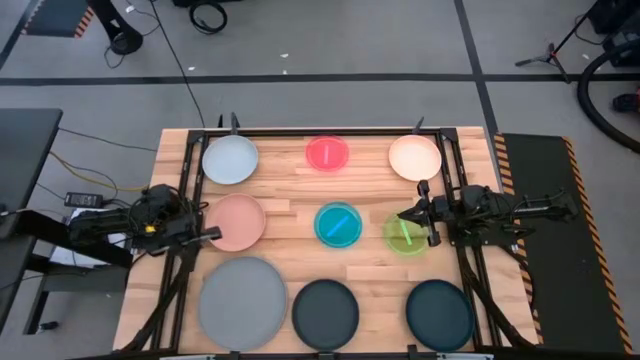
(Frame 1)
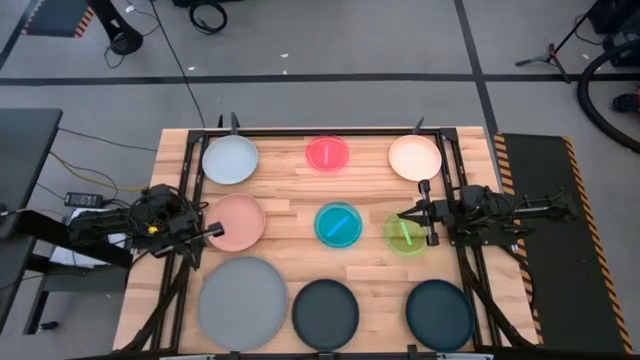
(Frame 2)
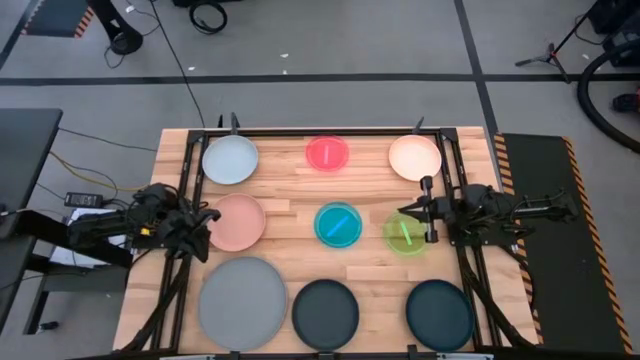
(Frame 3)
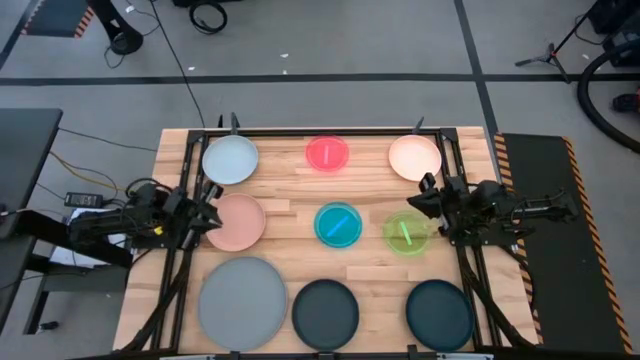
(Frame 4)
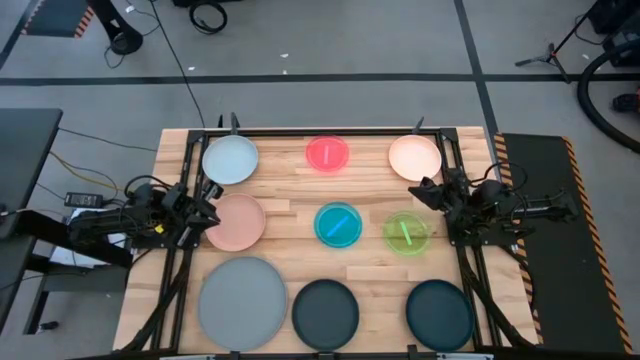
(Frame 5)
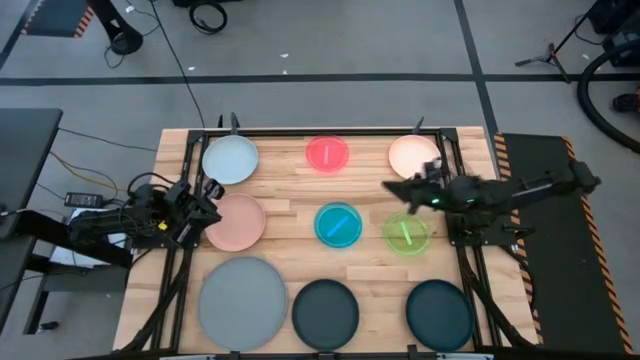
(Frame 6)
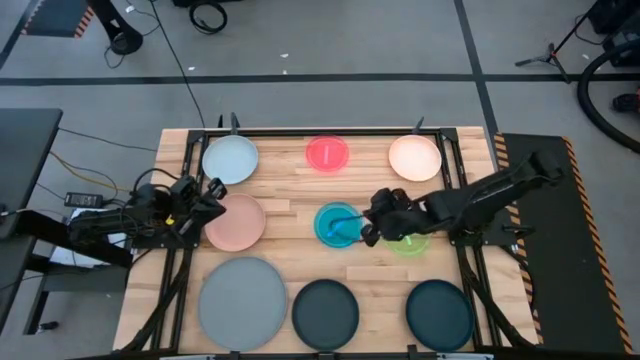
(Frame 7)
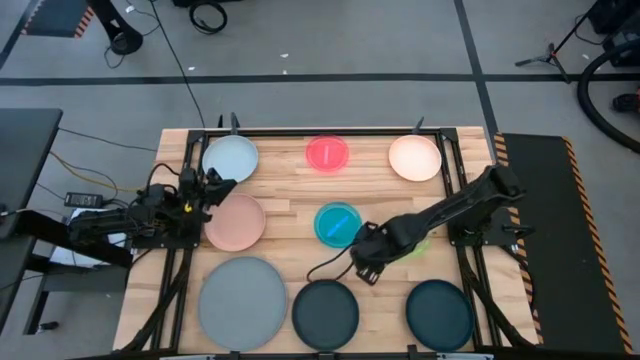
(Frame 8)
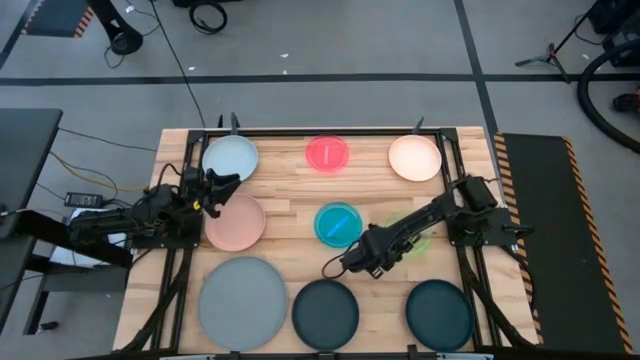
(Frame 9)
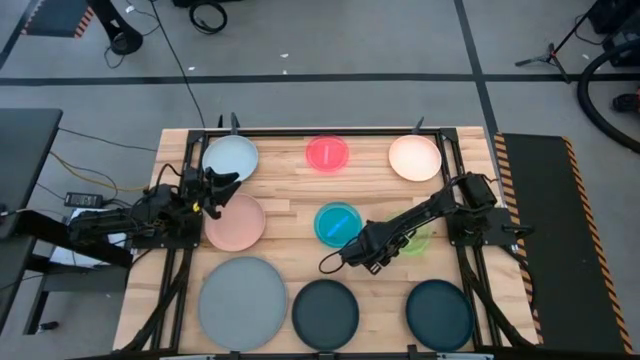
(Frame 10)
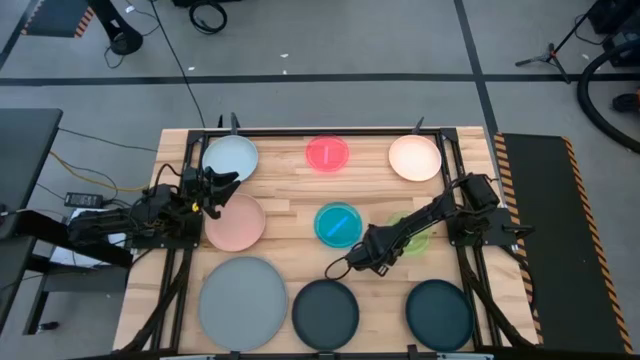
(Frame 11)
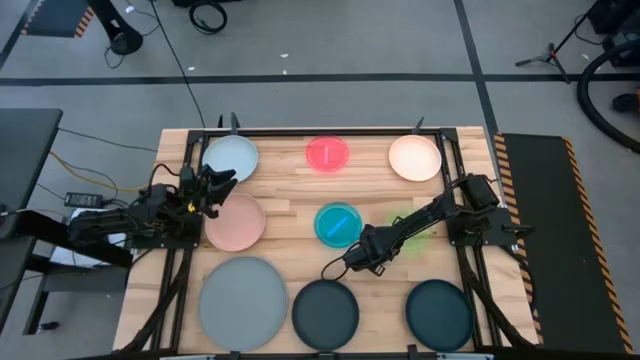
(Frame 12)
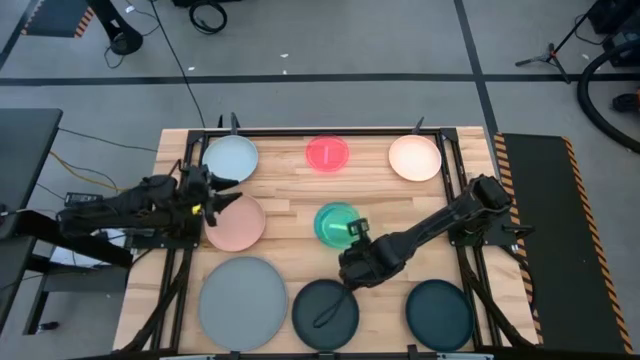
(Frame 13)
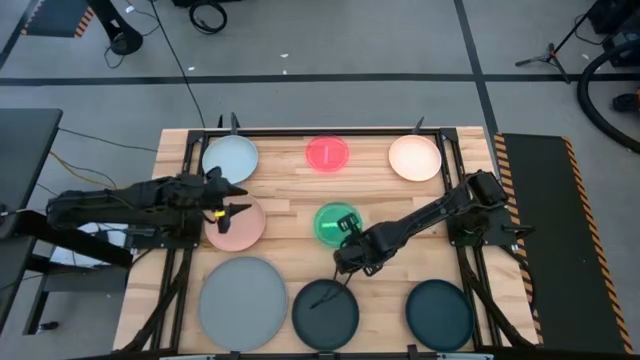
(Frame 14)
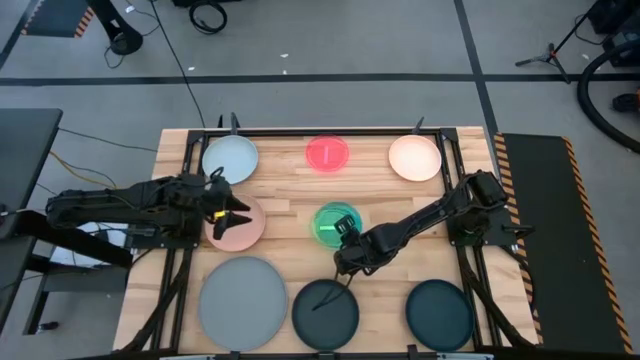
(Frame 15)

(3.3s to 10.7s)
Task: Stack plastic plates
Stack the green plate on top of the blue plate

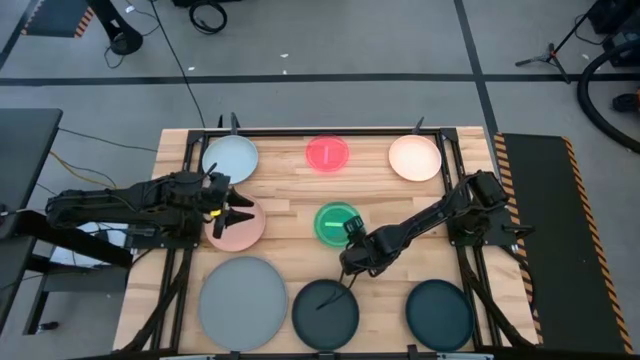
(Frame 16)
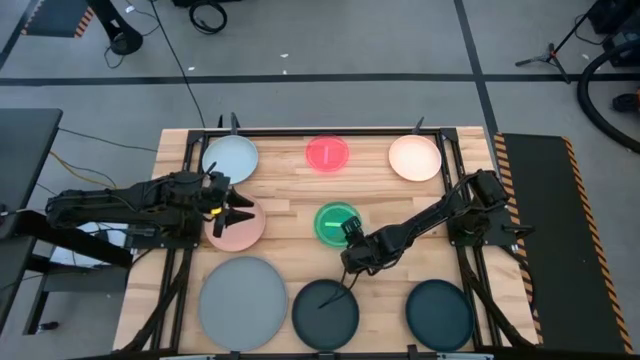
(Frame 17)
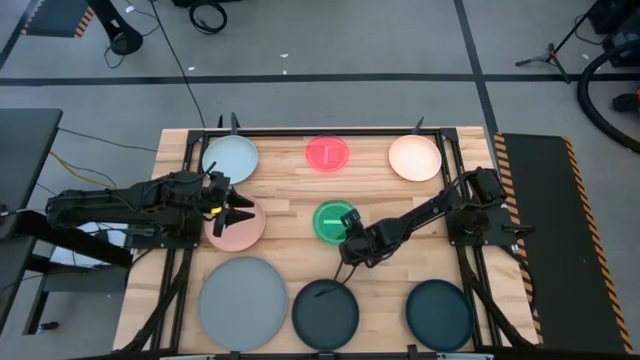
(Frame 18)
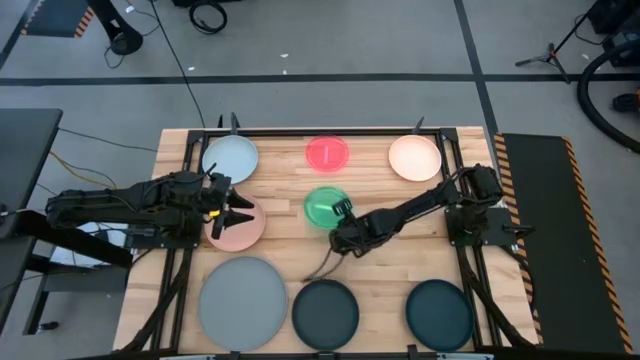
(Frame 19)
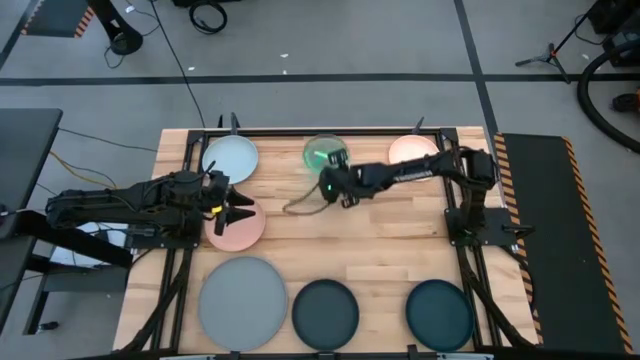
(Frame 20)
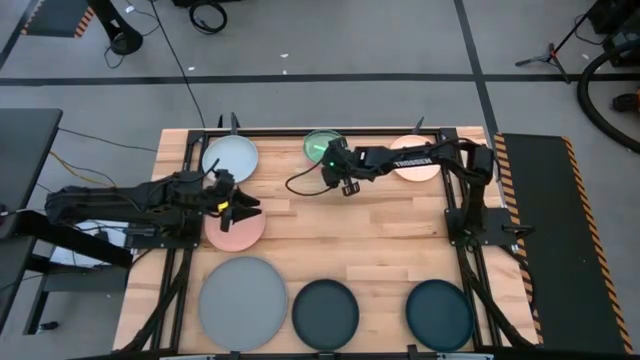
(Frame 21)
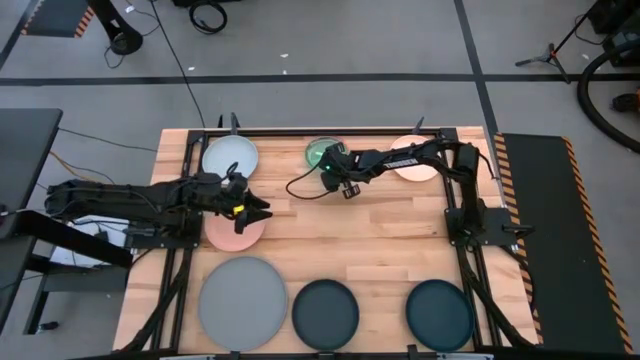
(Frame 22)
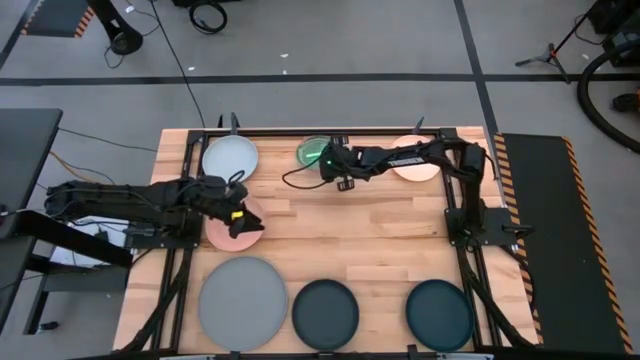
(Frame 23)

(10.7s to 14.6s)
Stack the stacked plates on top of the pink plate

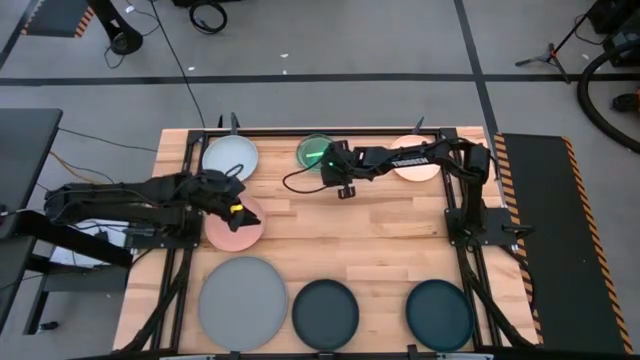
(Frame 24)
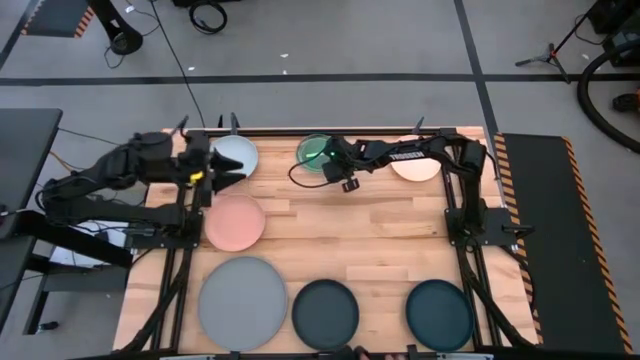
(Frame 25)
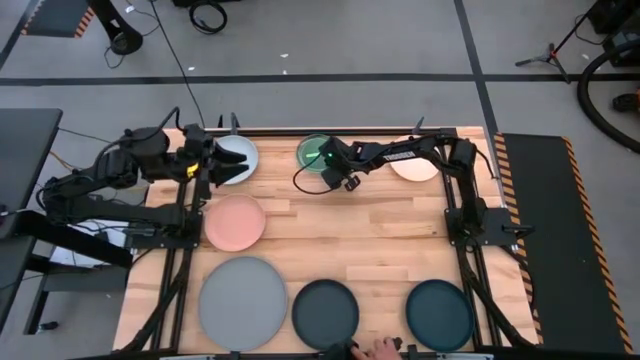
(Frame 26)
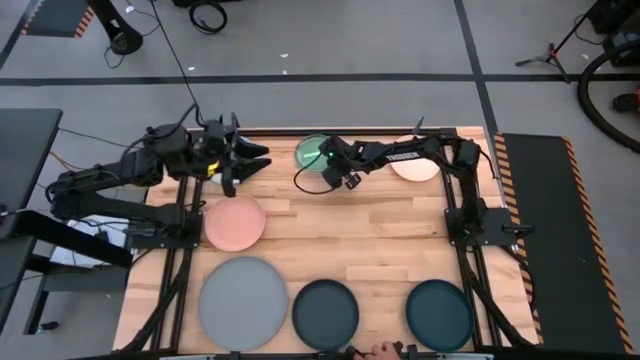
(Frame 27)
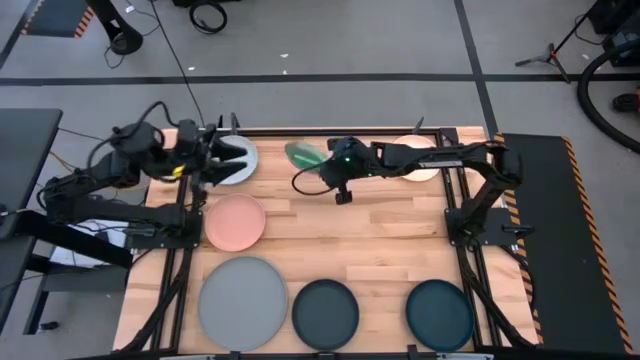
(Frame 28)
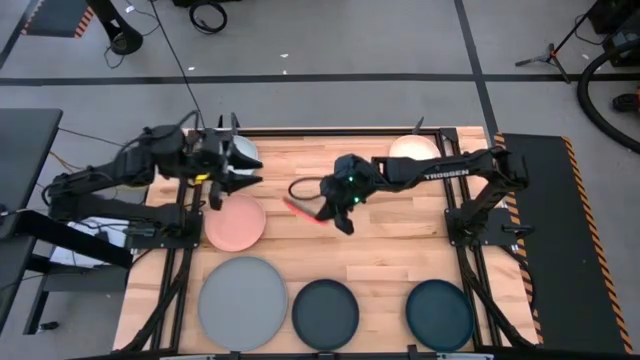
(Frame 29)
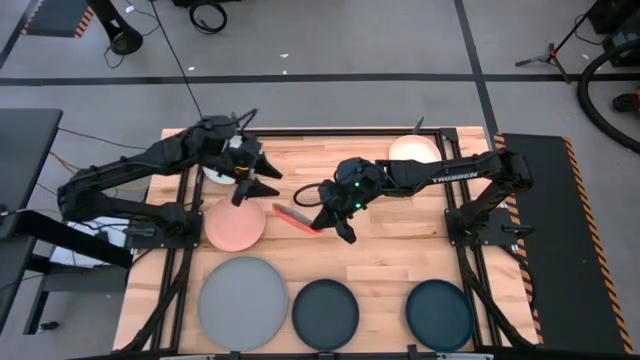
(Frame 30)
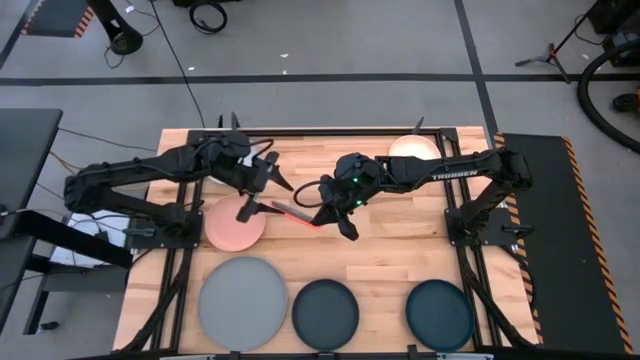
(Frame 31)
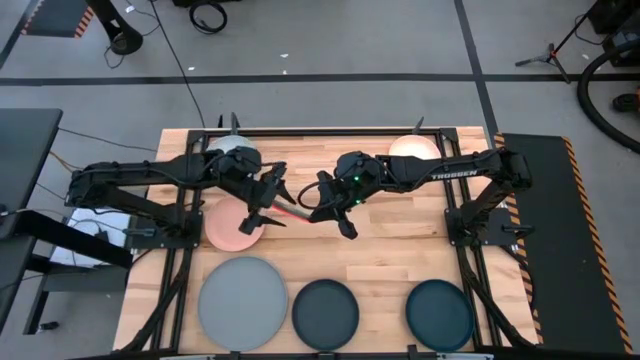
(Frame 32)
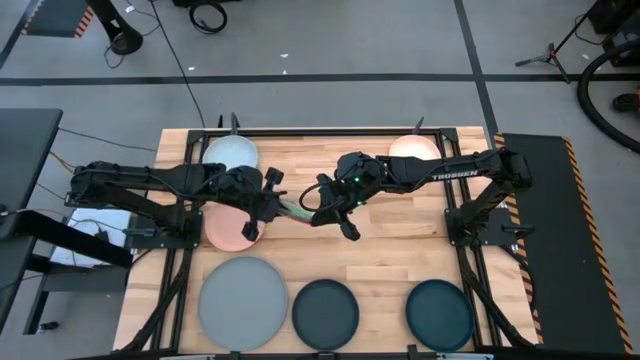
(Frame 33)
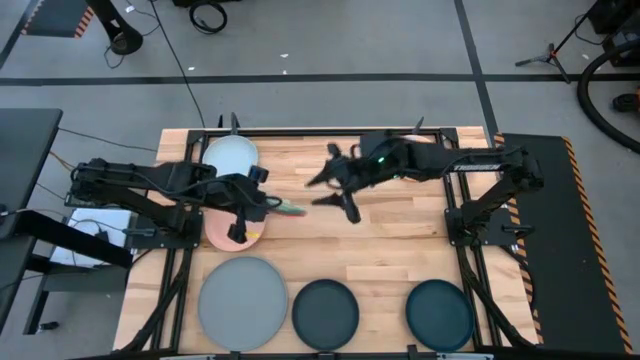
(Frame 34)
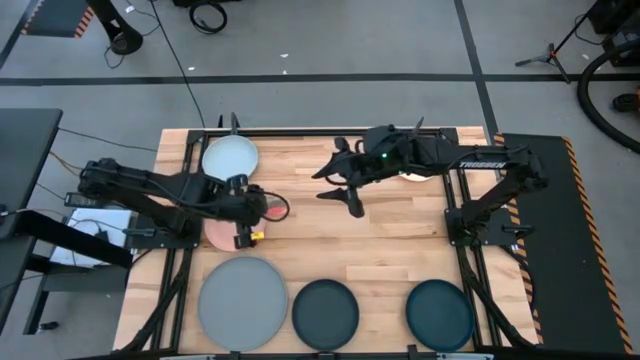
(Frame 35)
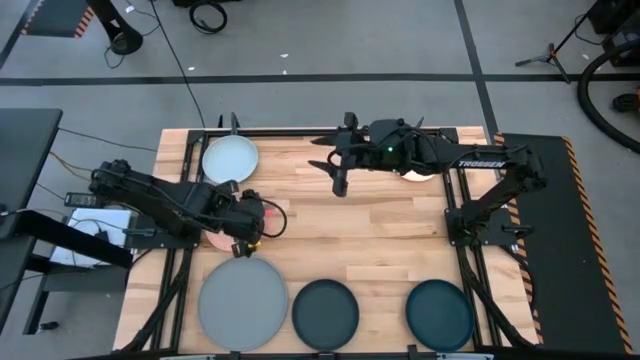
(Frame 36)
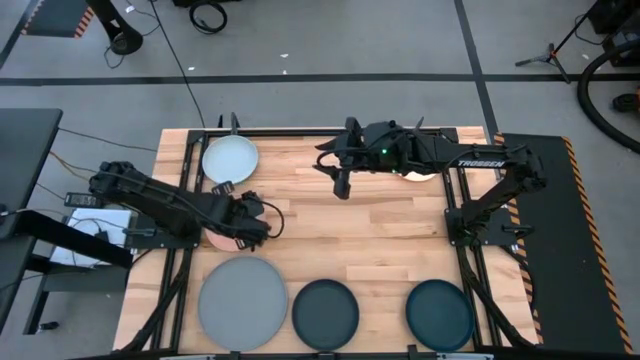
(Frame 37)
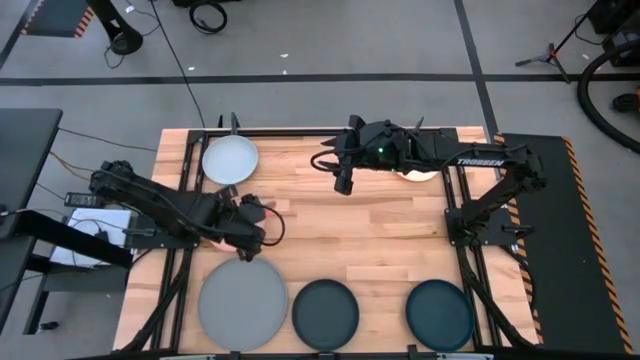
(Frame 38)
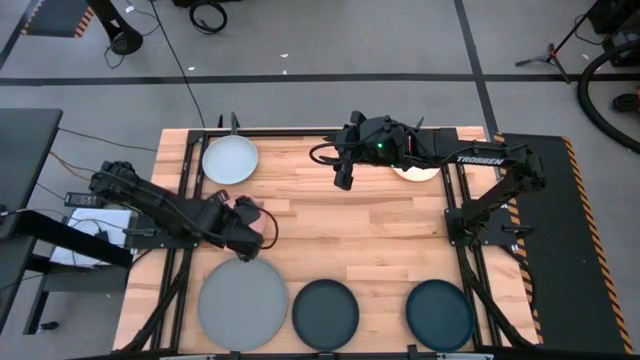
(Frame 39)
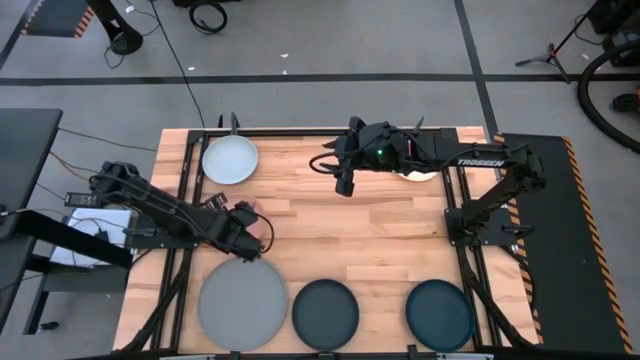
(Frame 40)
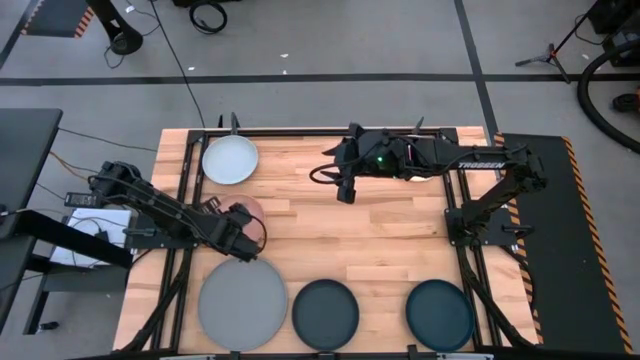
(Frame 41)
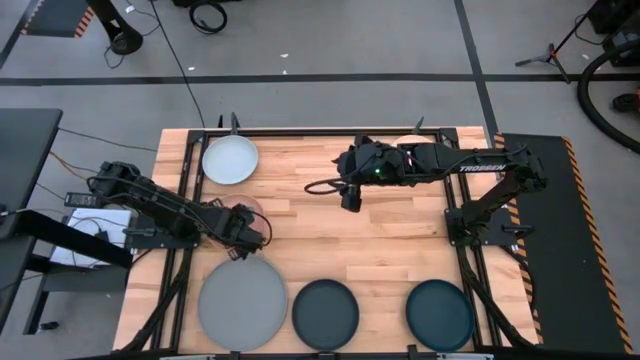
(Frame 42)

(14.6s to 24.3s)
Stack the stacked plates on top of the orange plate
